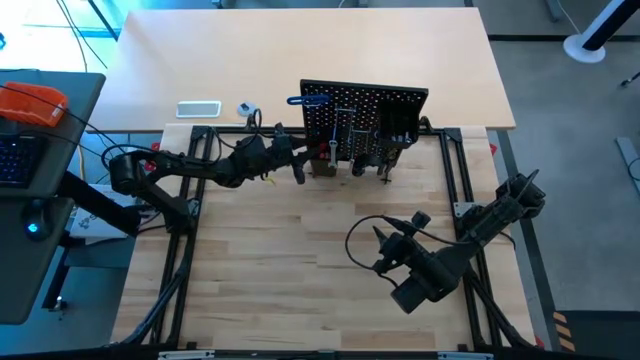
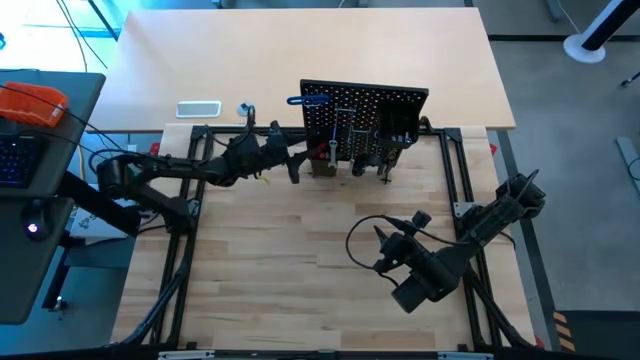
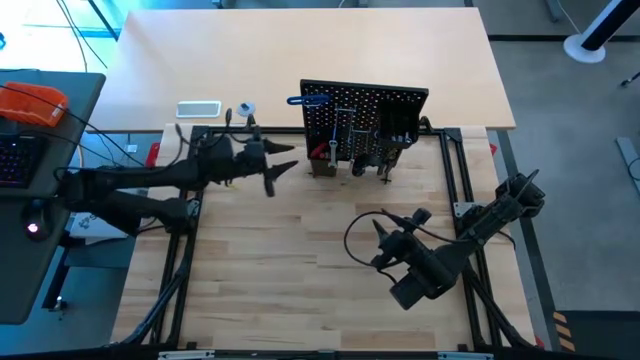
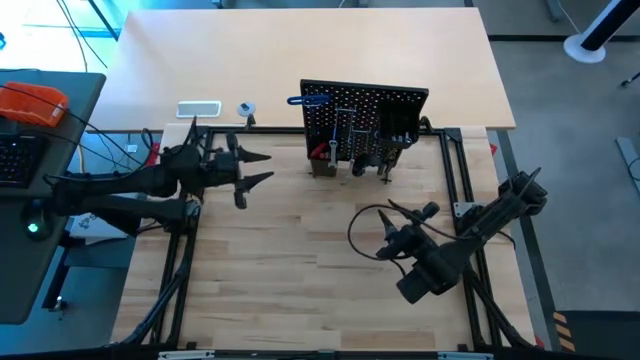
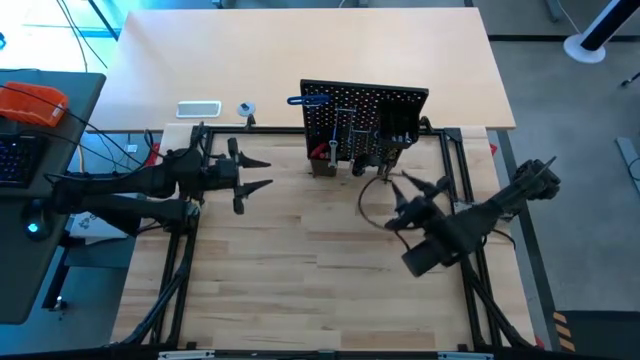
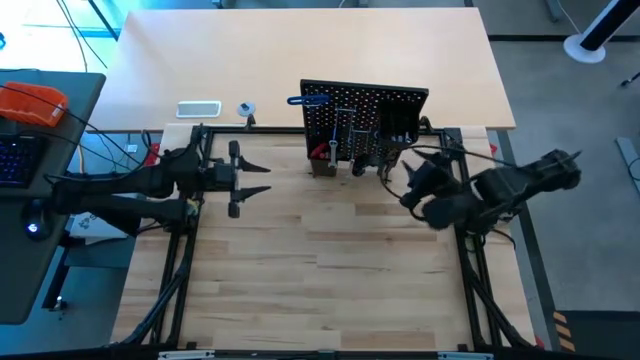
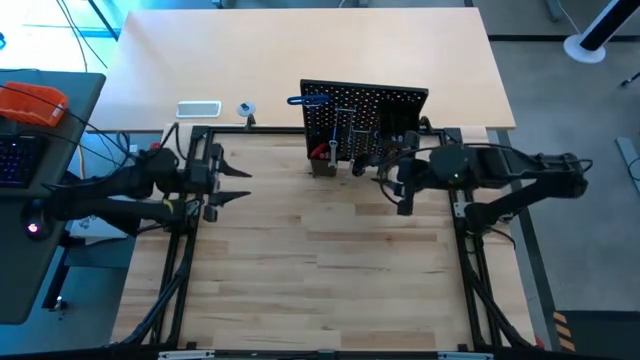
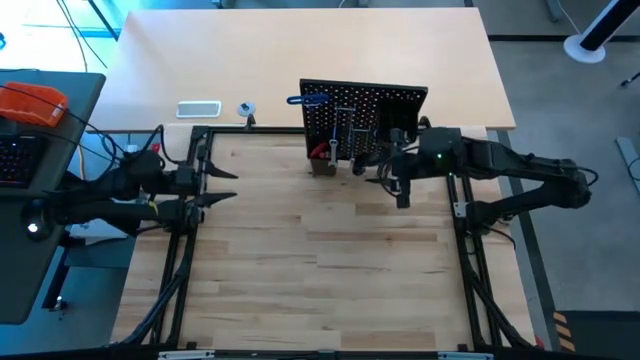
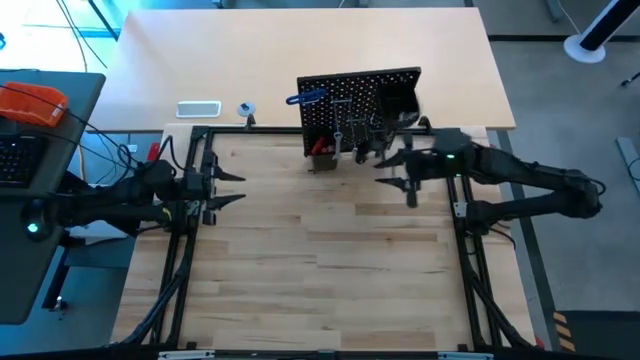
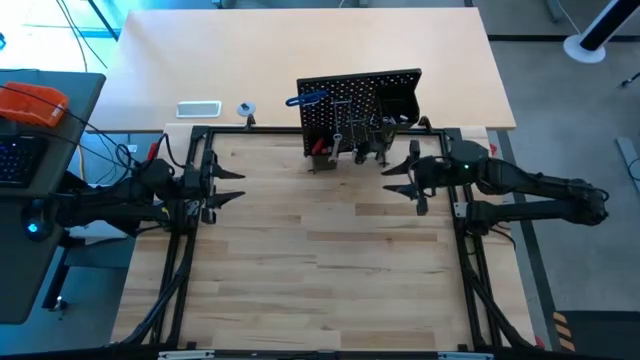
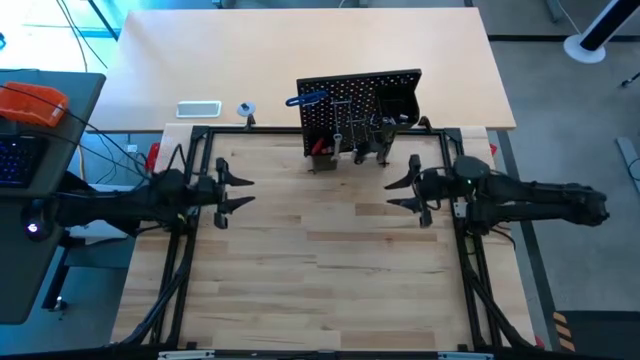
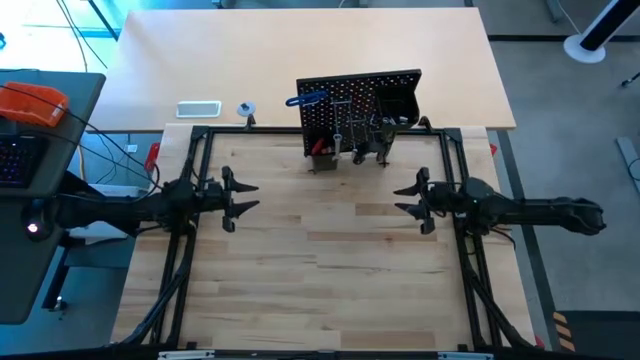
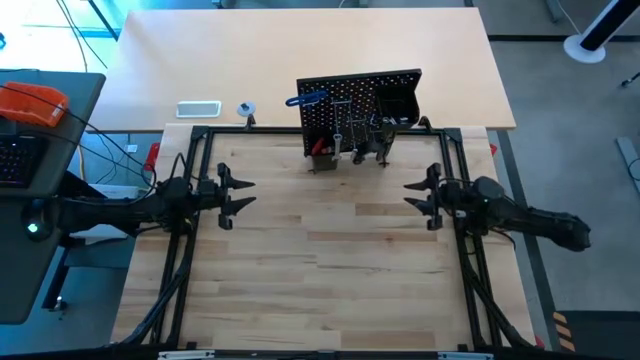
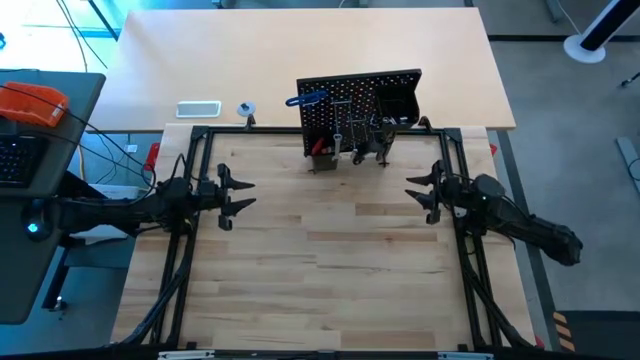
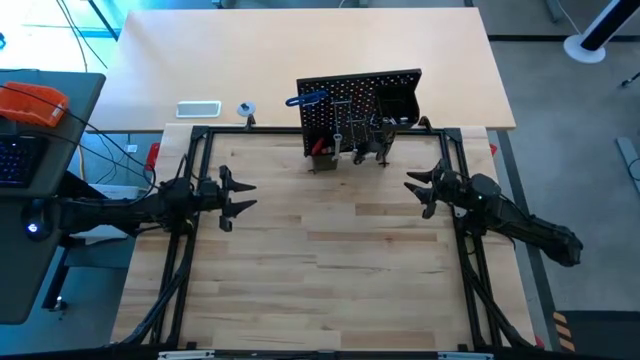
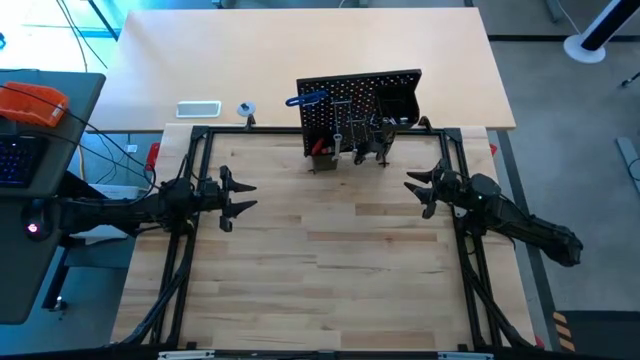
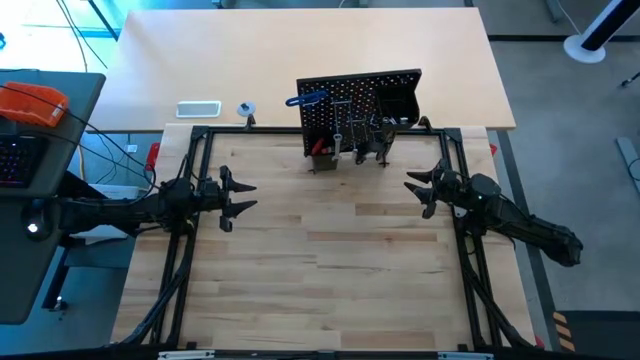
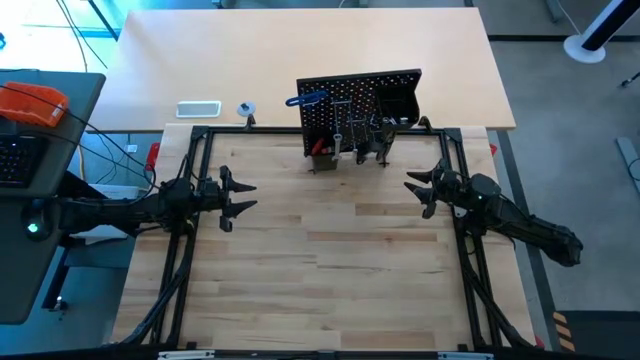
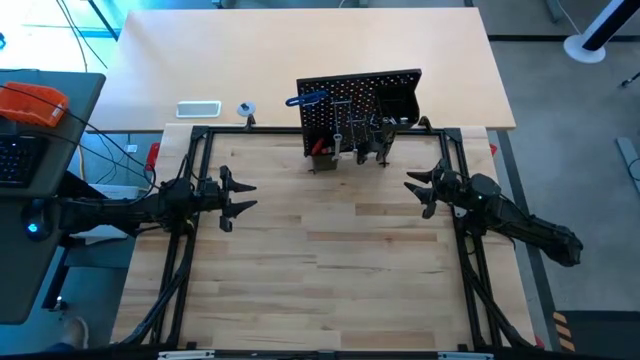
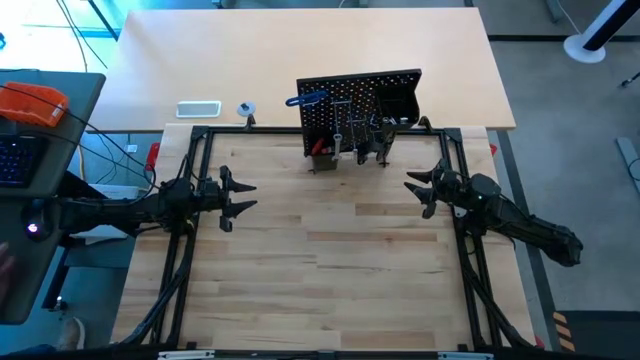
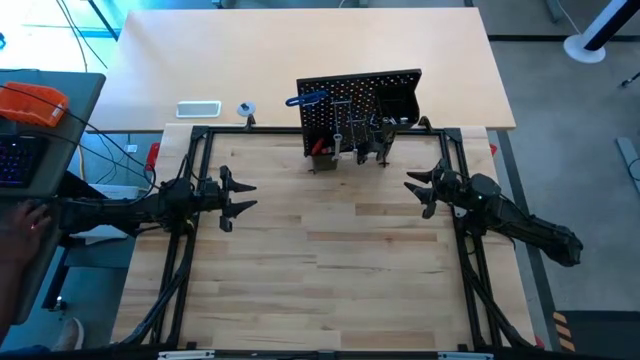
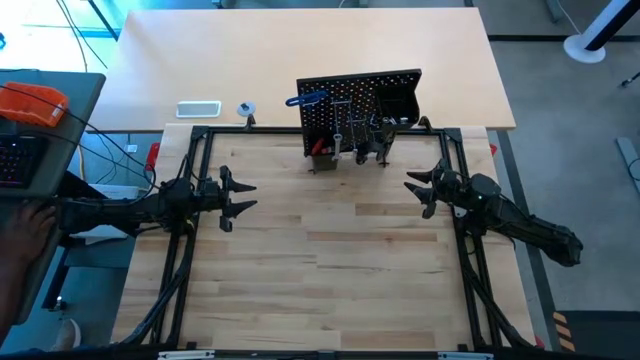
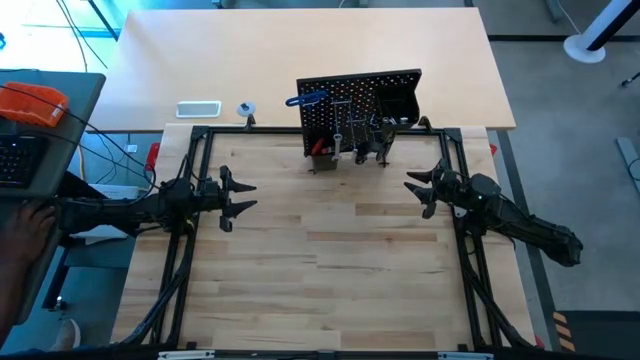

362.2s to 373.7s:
Task: Hang tools onto peg board
Return to Home Position

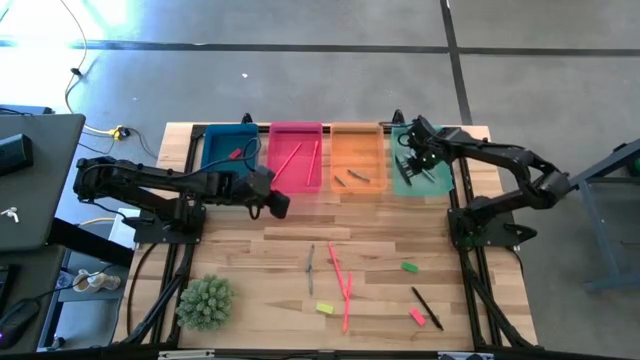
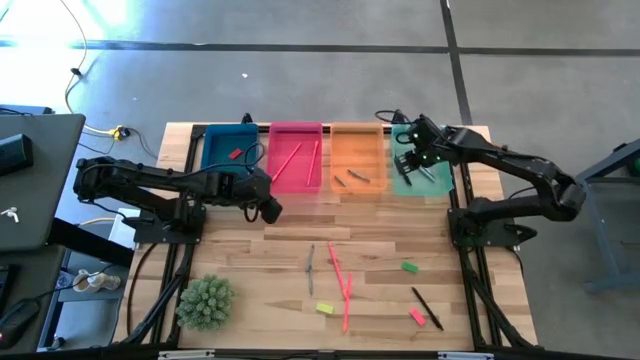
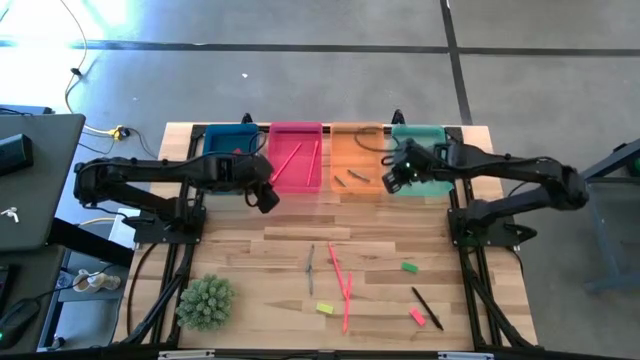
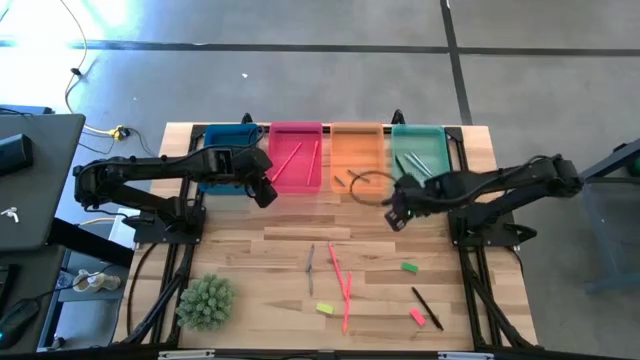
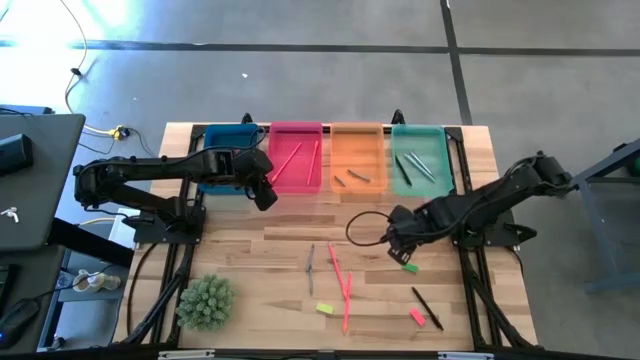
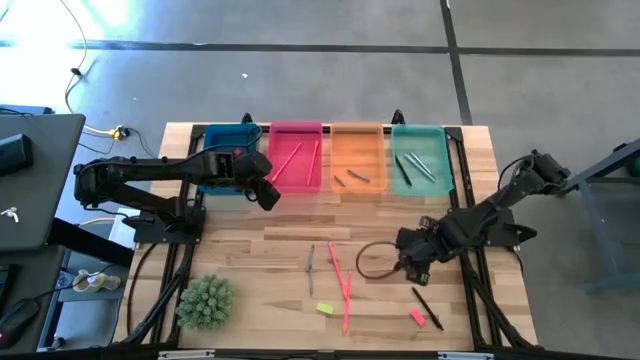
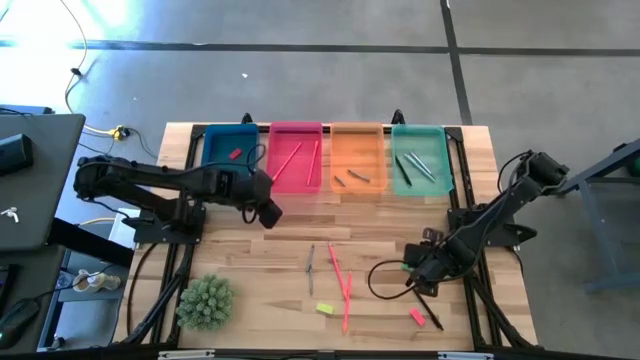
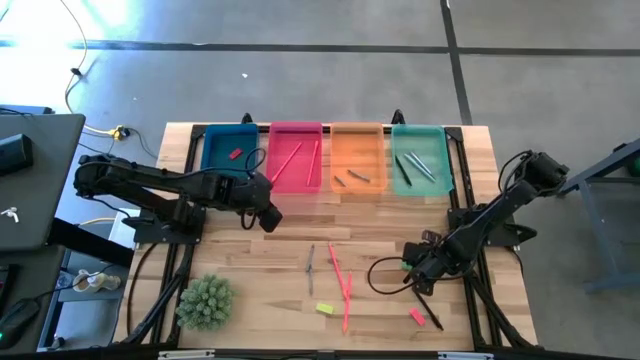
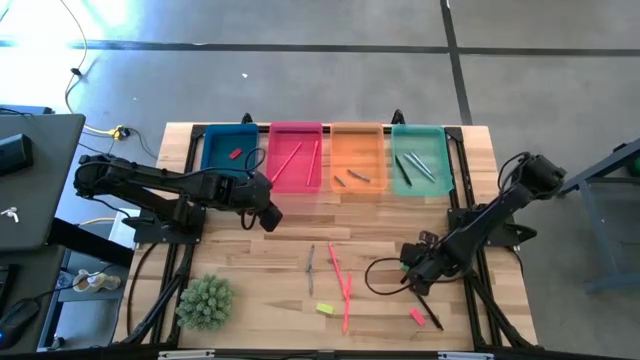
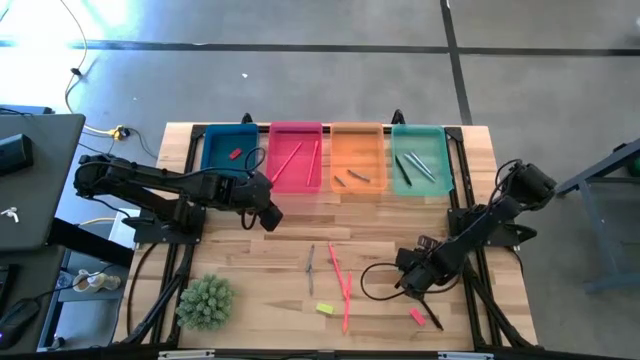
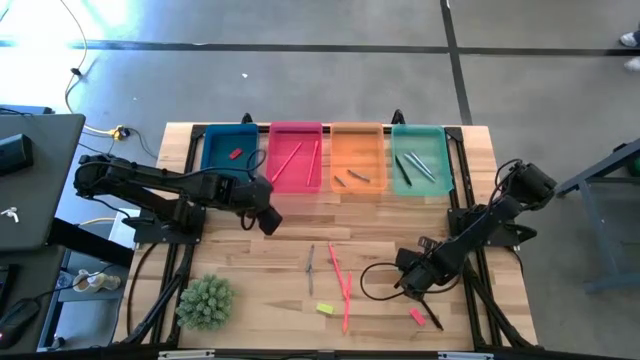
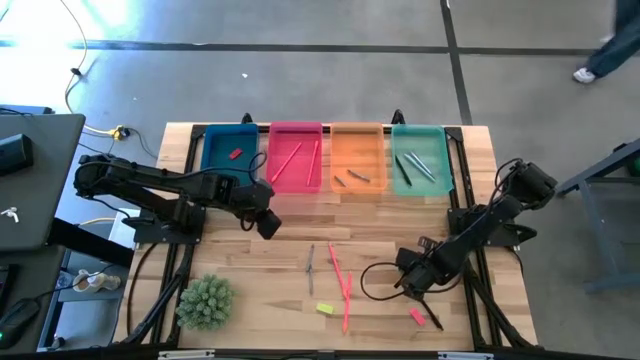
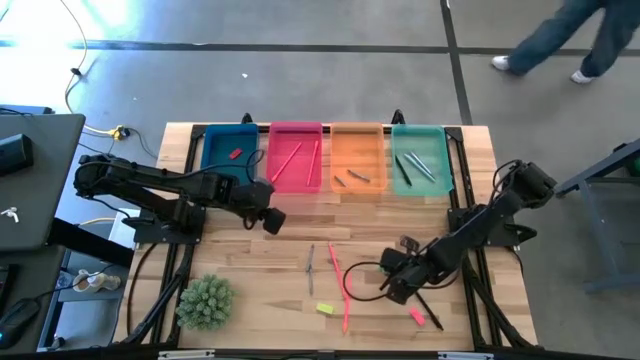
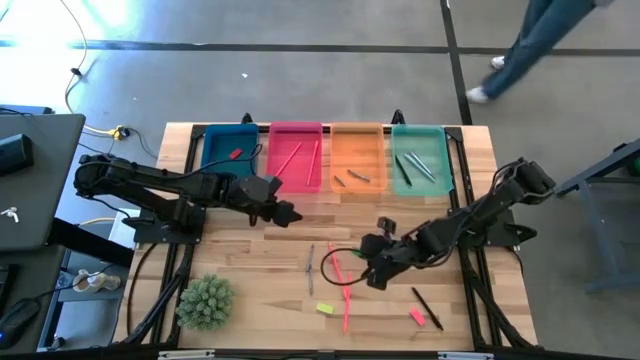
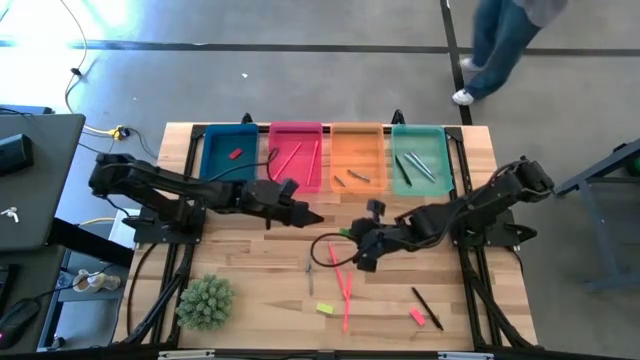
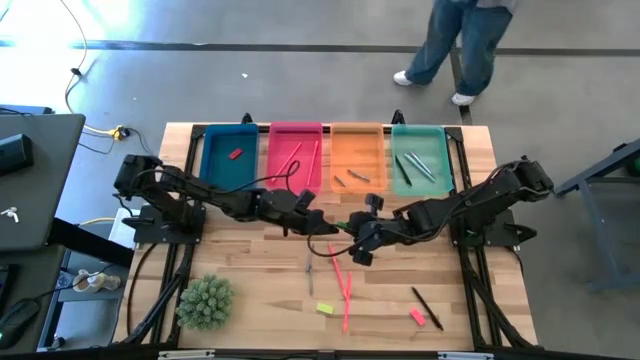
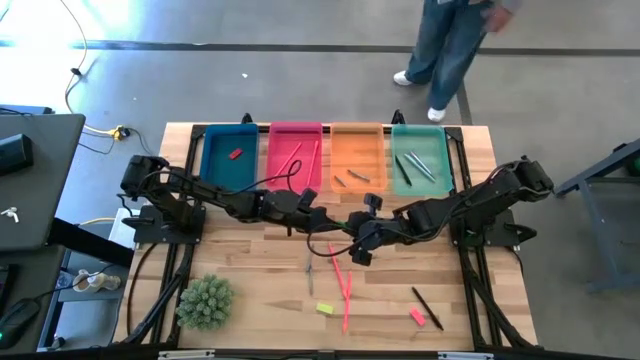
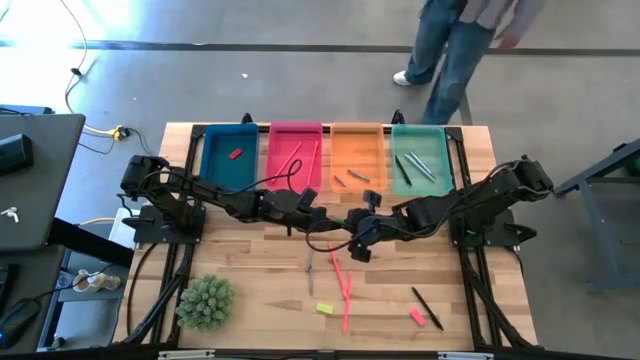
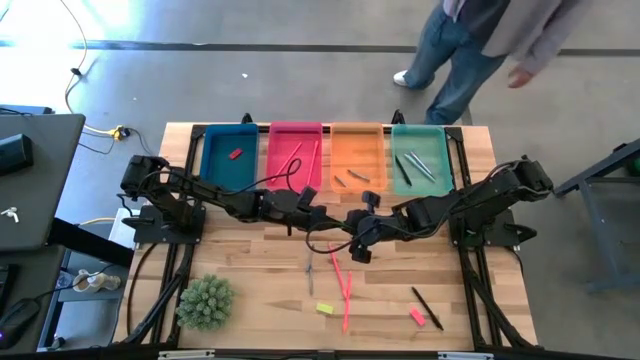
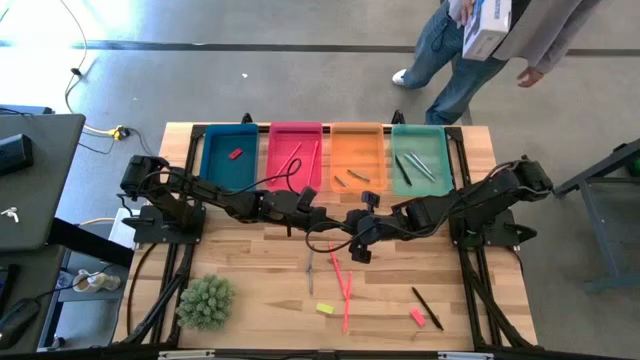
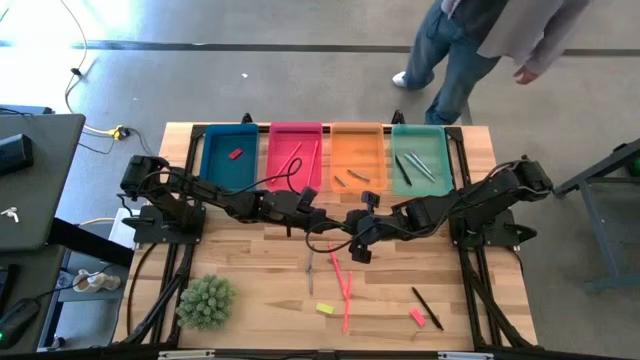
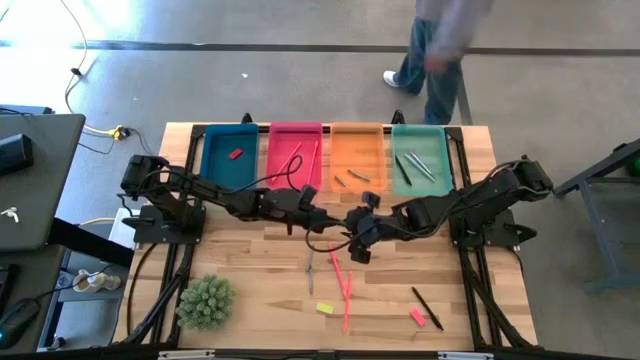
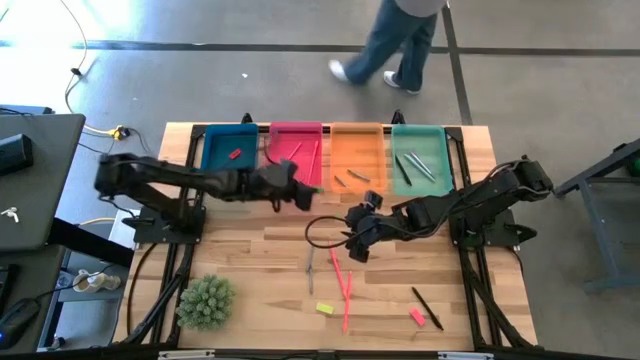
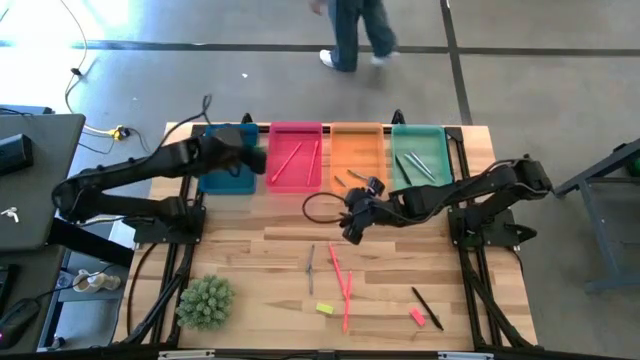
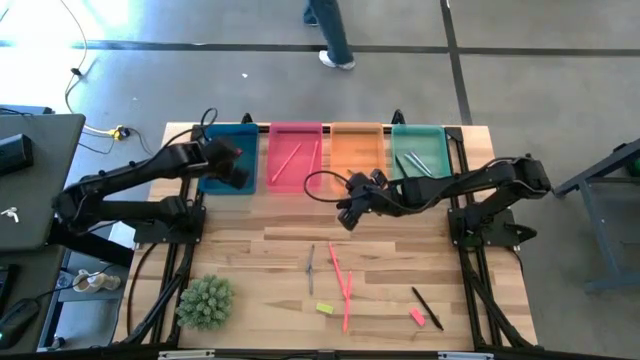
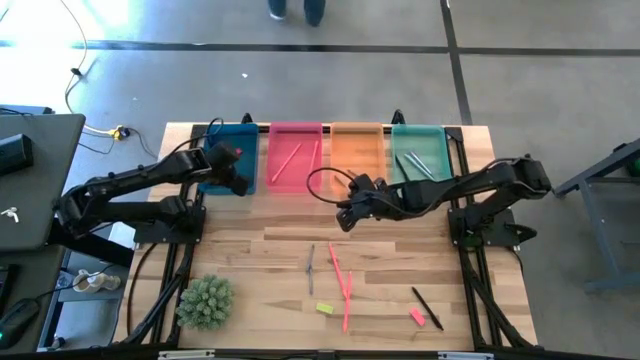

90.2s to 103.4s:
Task: Sort crayons/erasers/pens/pencils in bins
Put the green eraser into the blue bin
